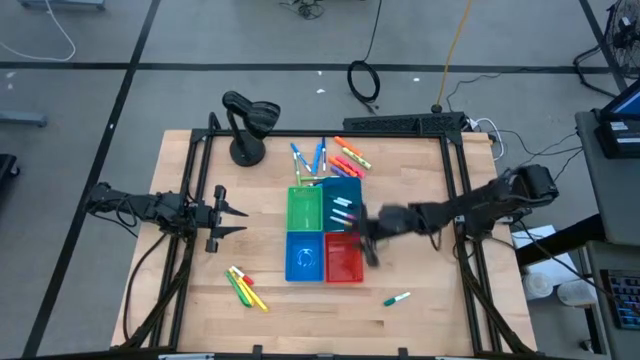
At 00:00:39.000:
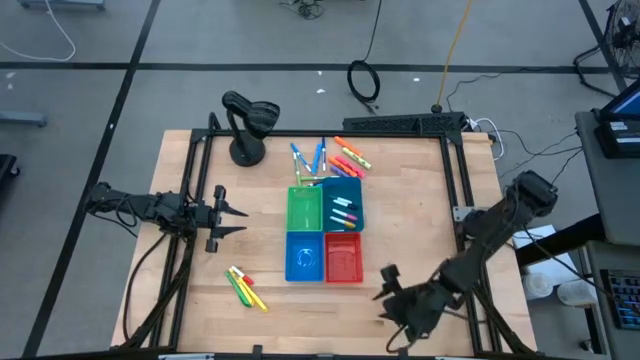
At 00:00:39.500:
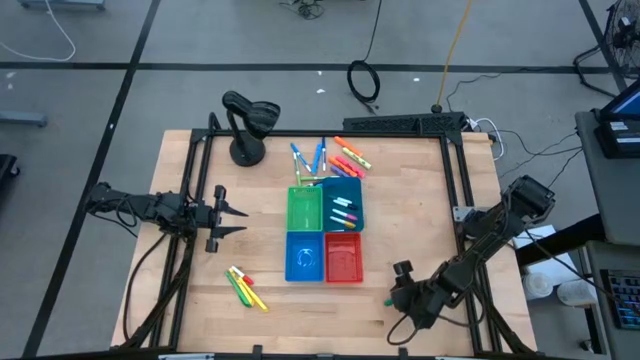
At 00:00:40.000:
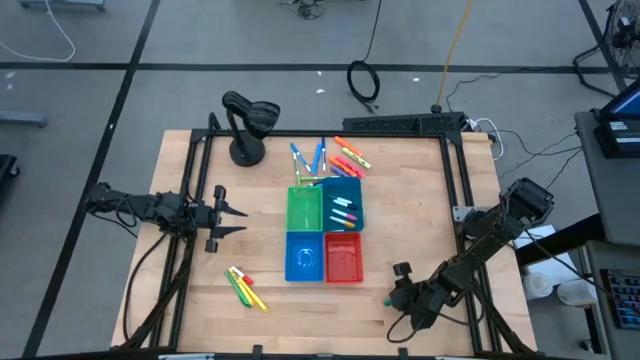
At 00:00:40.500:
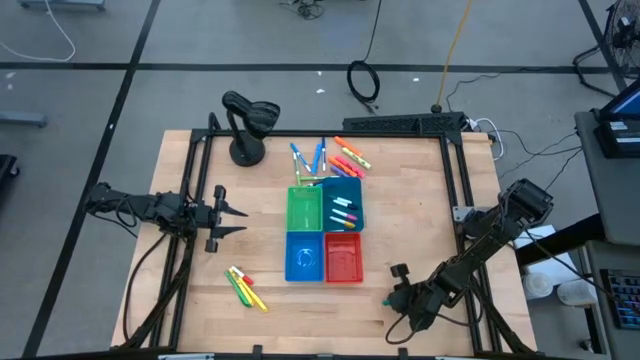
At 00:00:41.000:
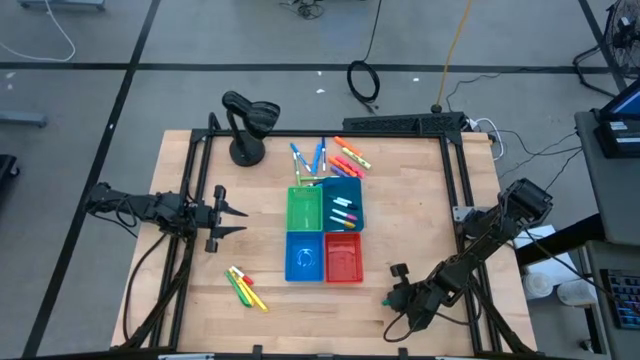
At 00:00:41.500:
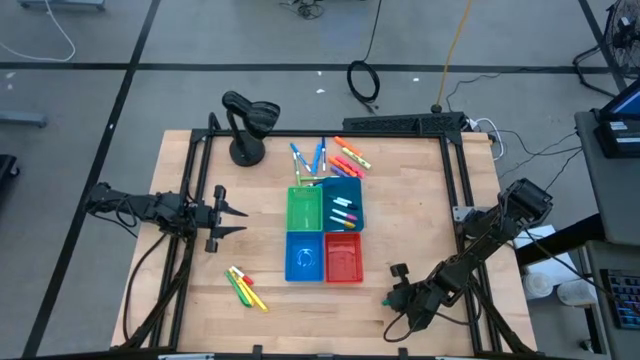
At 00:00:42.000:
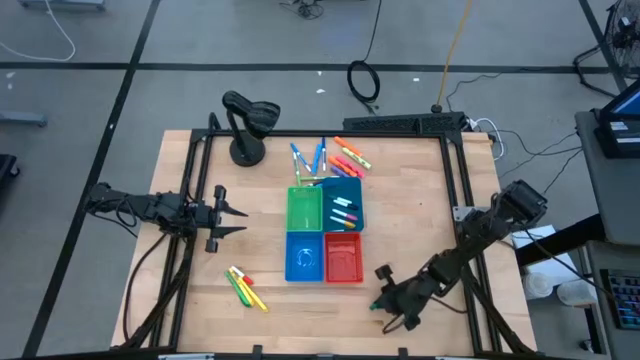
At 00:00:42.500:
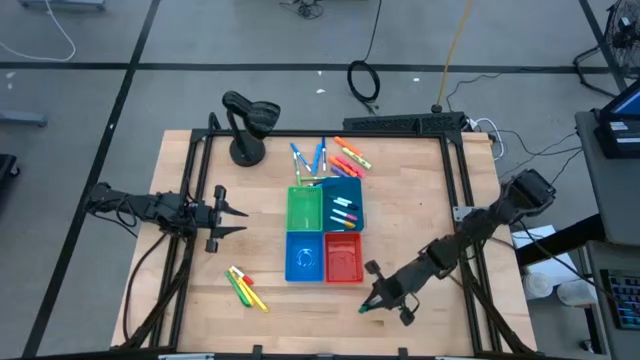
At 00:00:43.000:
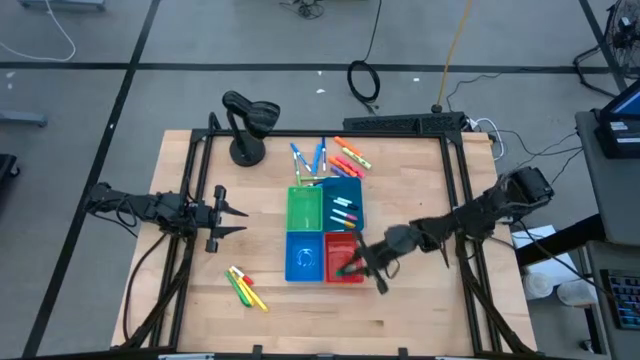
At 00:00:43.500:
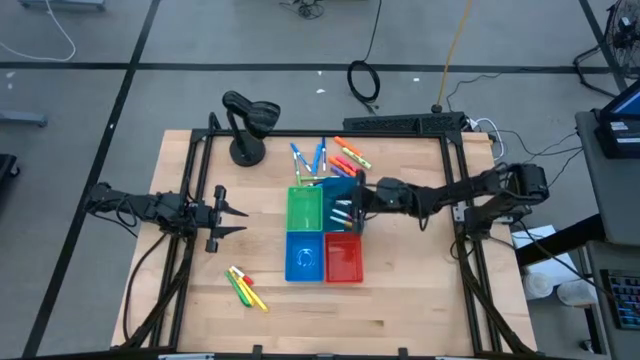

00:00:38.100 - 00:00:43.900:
Task: Pick & Place Markers
Put the green highlighter pen into the blue bin

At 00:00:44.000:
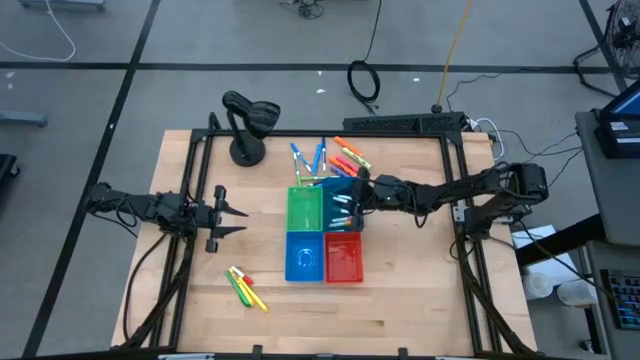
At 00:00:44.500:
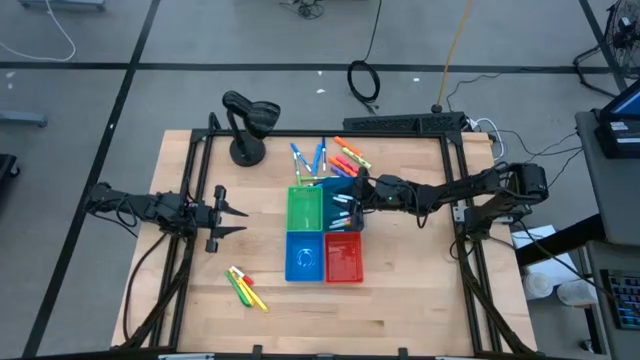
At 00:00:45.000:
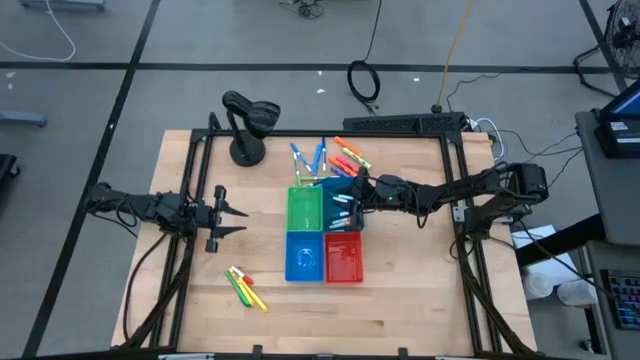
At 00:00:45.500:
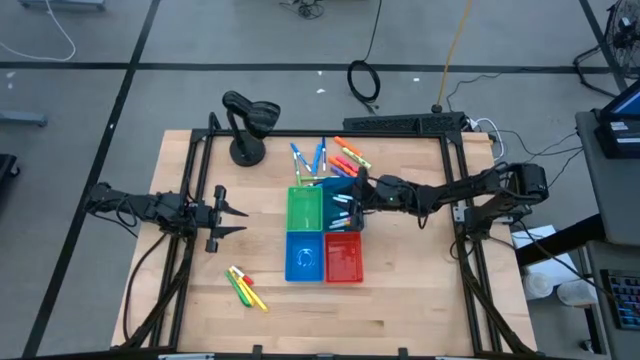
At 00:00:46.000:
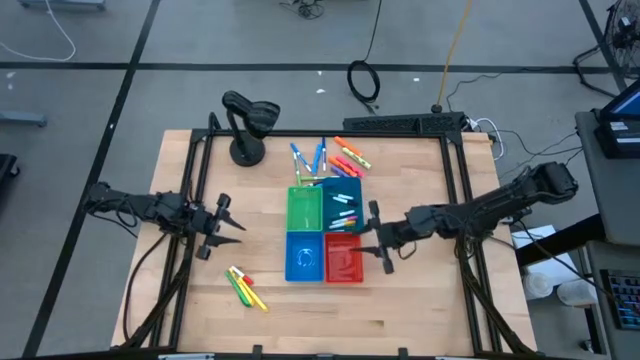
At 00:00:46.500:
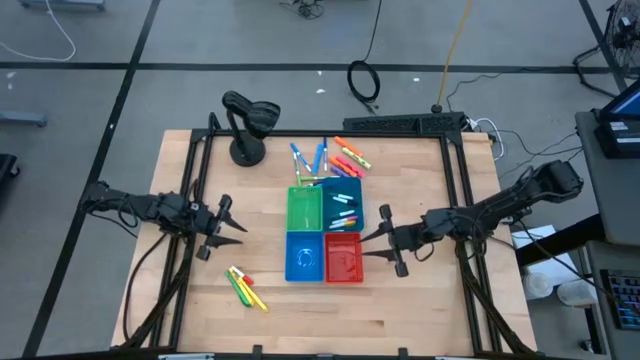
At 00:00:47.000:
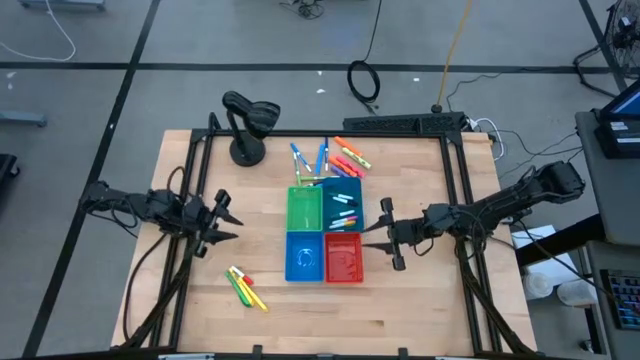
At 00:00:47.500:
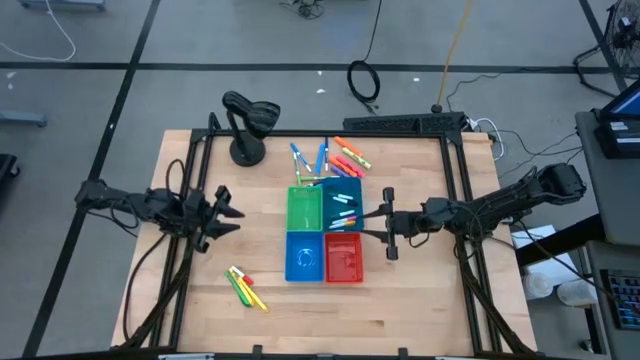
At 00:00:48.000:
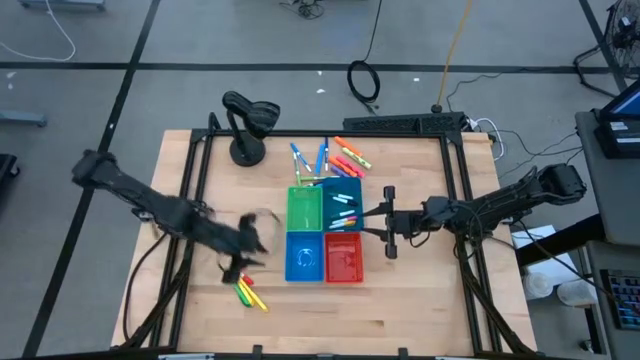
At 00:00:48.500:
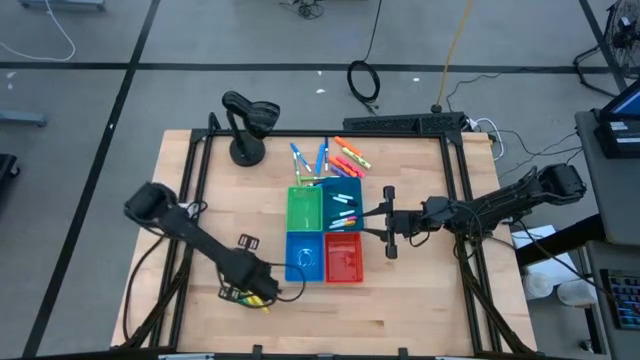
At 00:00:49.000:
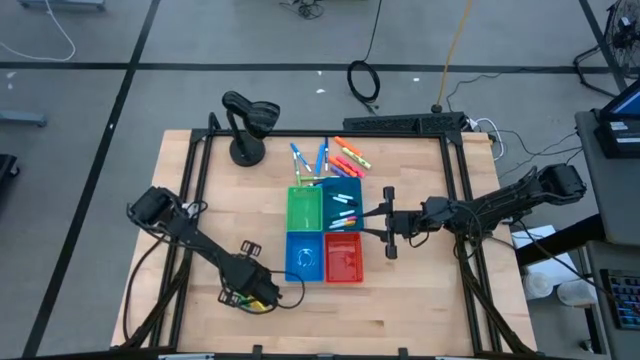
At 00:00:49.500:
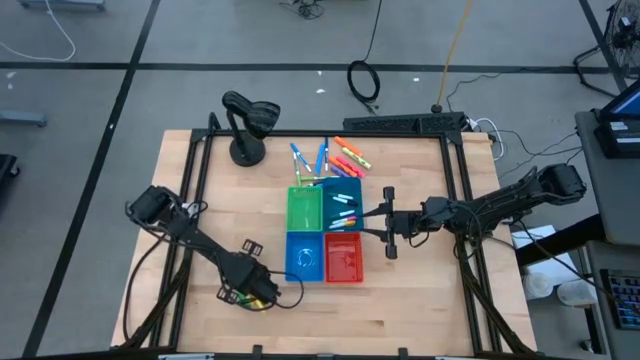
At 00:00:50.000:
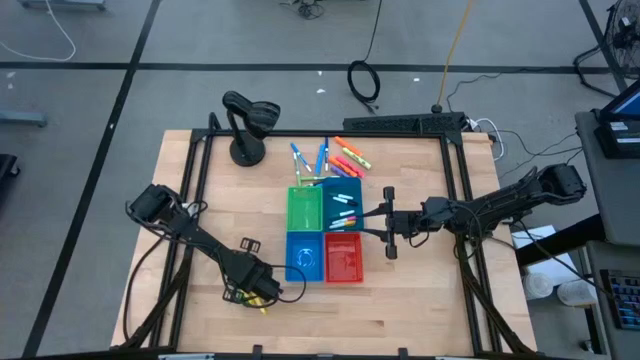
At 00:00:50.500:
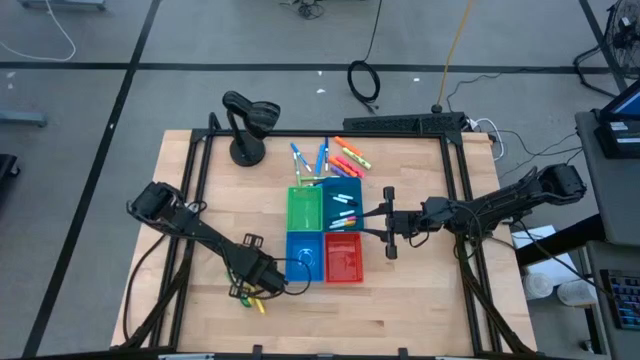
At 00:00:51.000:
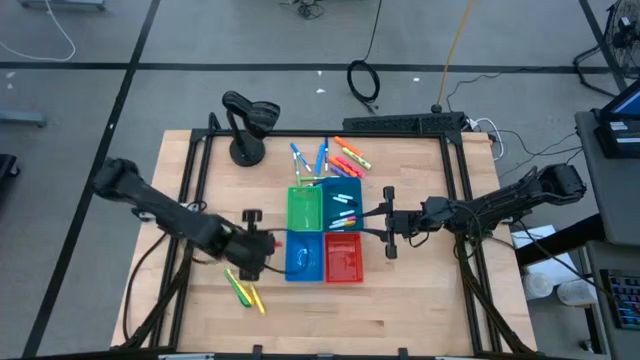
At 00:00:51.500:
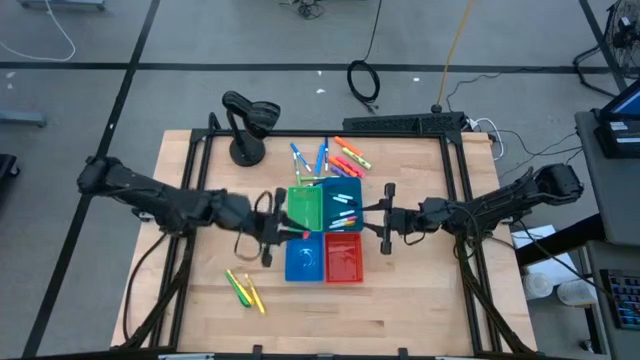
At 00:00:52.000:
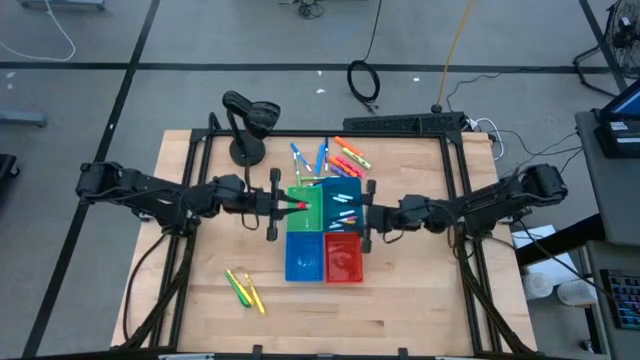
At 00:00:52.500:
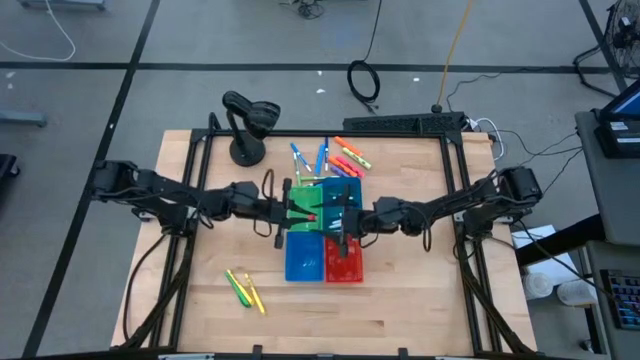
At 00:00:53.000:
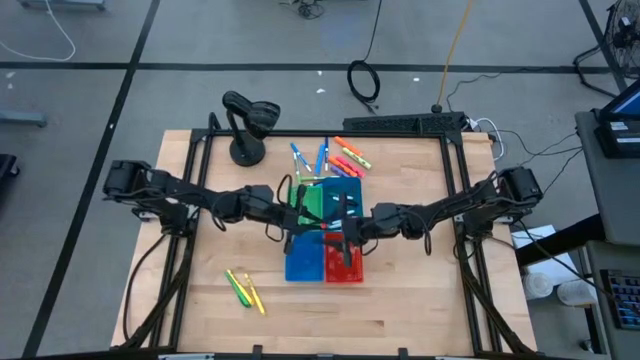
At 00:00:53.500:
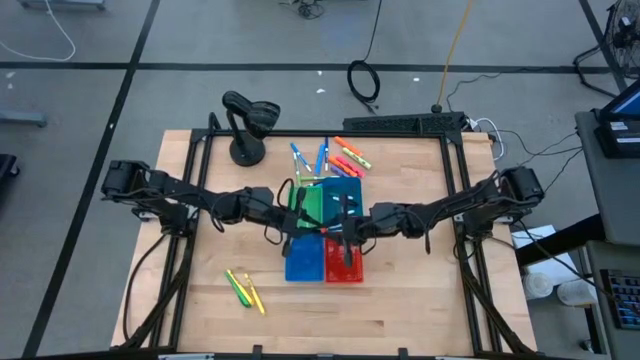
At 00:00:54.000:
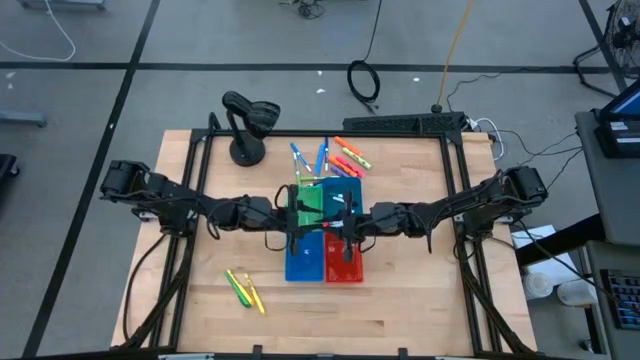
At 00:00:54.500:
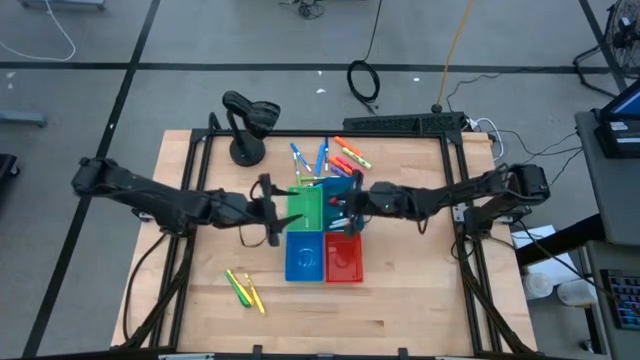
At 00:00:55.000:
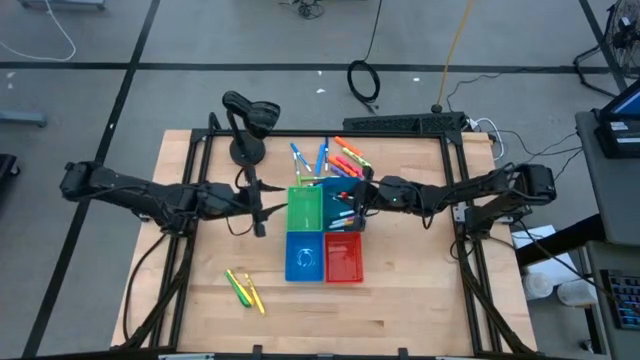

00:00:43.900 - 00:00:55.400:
Put the red highlighter pen into the blue bin

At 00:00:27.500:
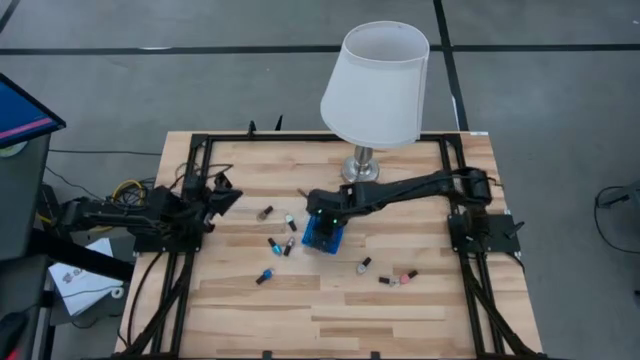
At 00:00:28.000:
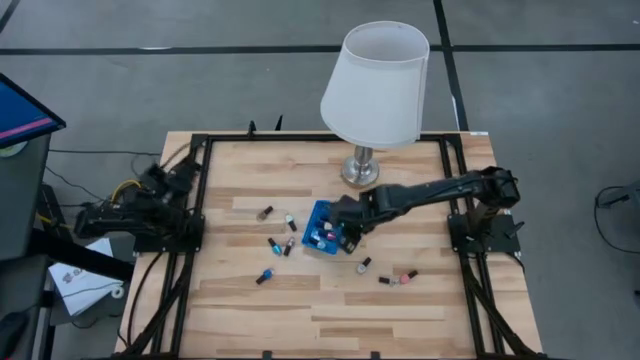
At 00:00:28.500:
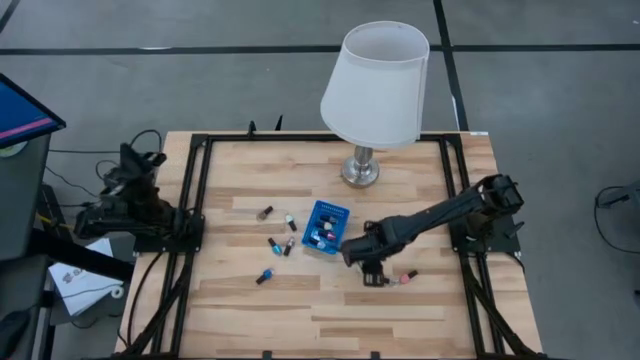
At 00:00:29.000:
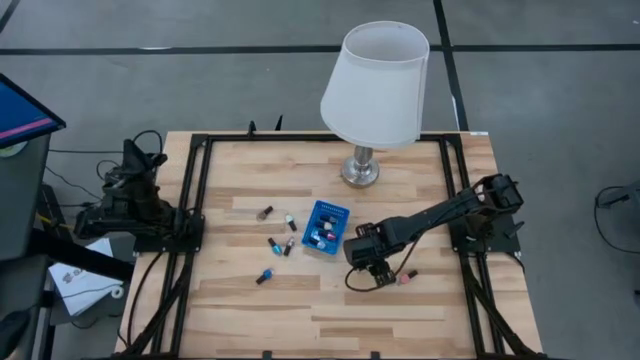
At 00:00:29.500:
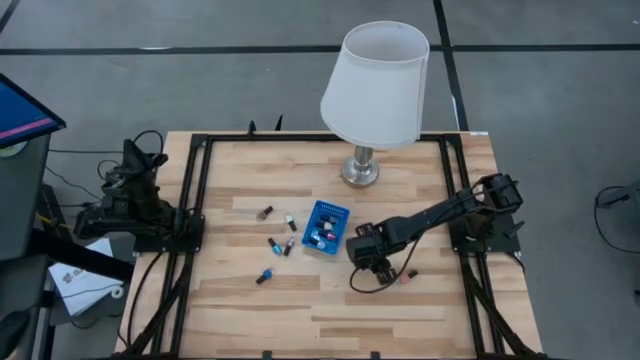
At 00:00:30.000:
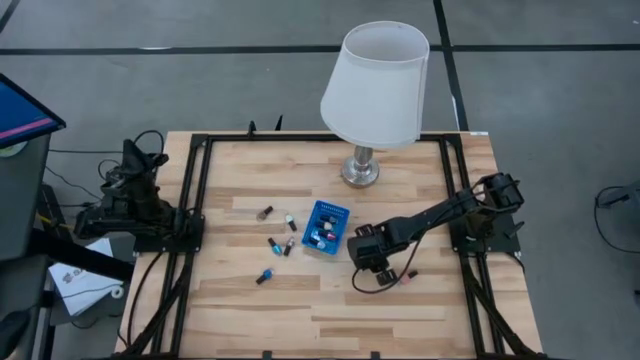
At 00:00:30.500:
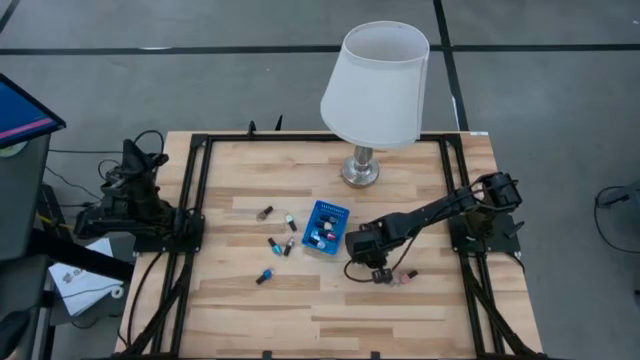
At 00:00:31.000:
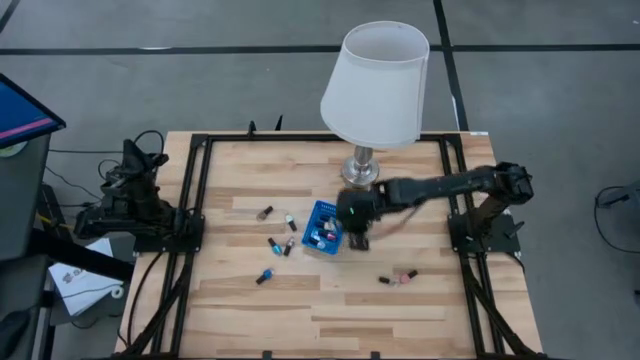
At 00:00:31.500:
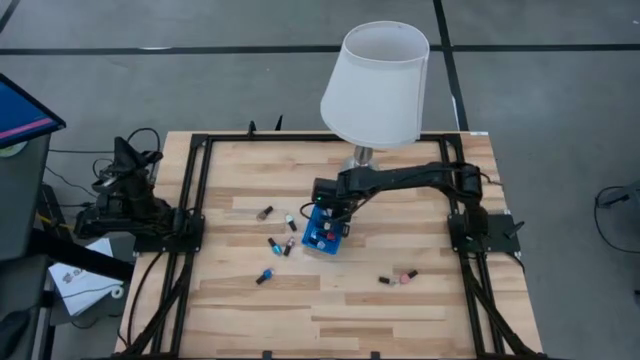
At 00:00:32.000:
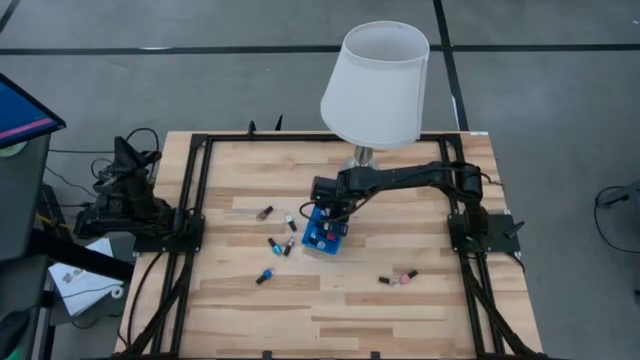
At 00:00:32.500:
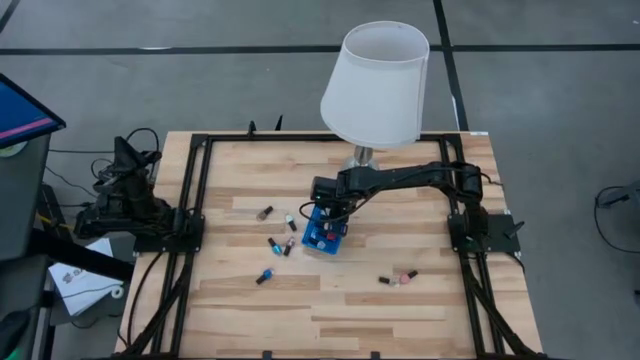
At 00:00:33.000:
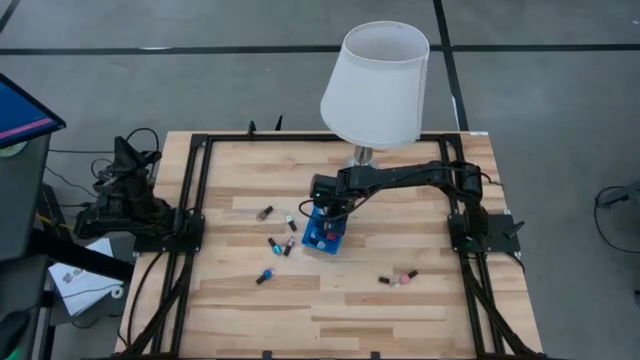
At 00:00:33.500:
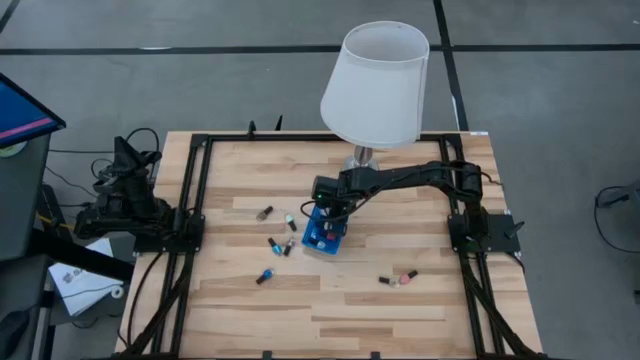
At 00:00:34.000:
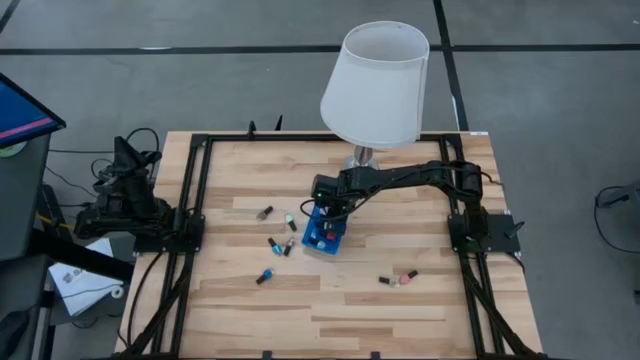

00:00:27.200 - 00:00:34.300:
Task: Pick & Place Nail Polish
Put the white nail polish into the blue basket
